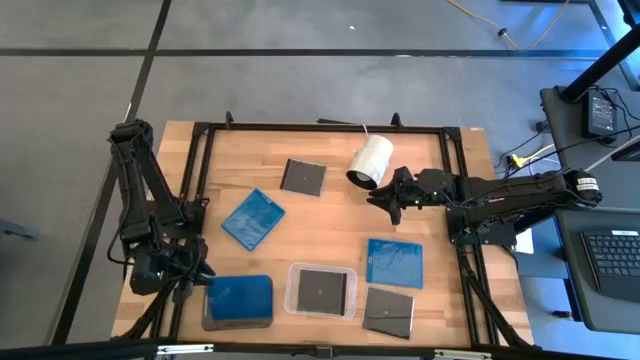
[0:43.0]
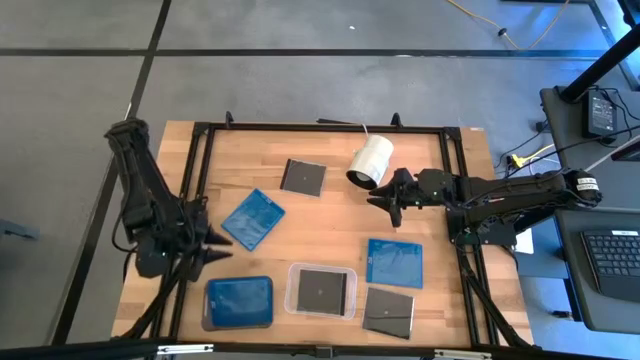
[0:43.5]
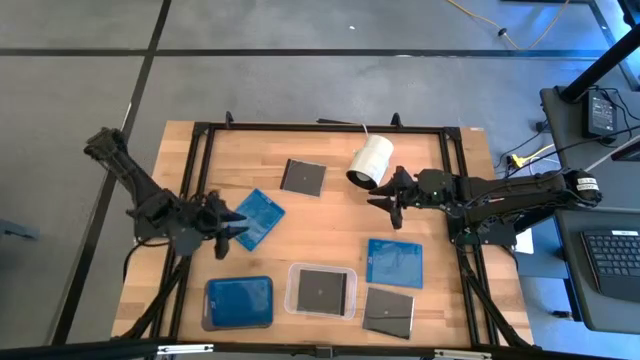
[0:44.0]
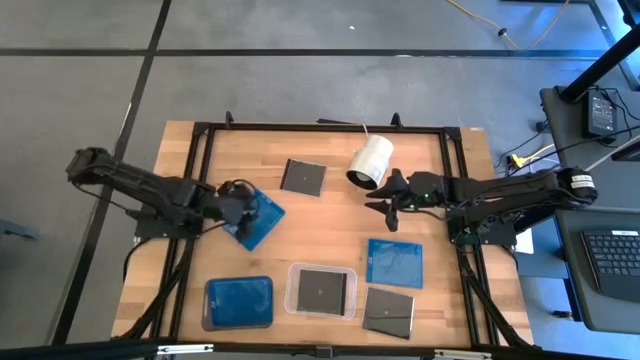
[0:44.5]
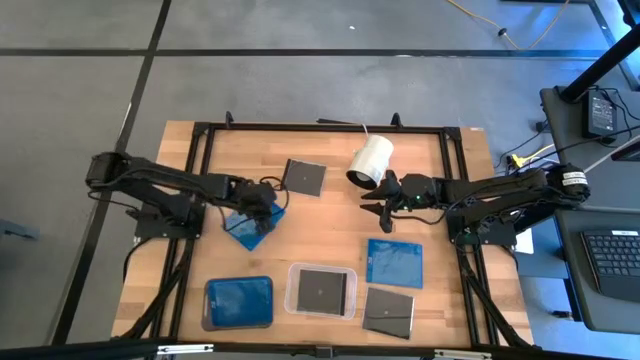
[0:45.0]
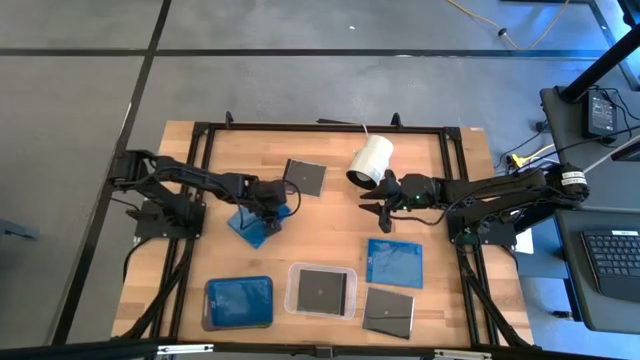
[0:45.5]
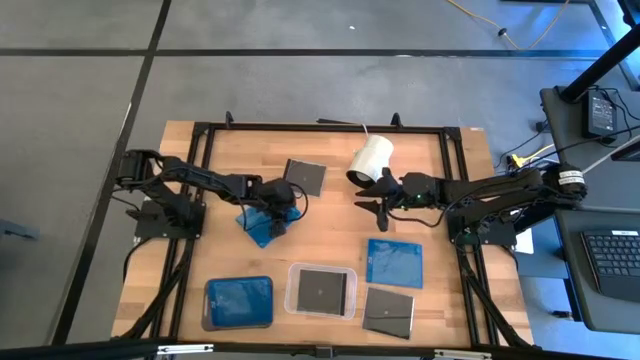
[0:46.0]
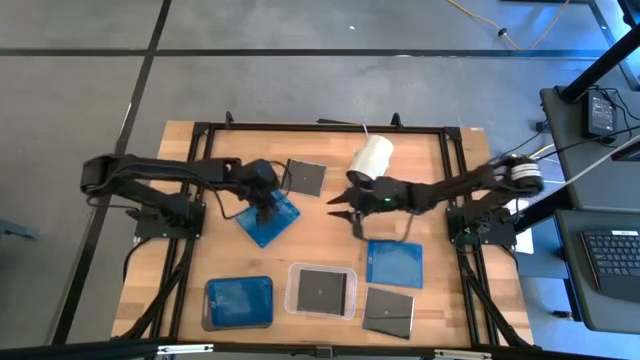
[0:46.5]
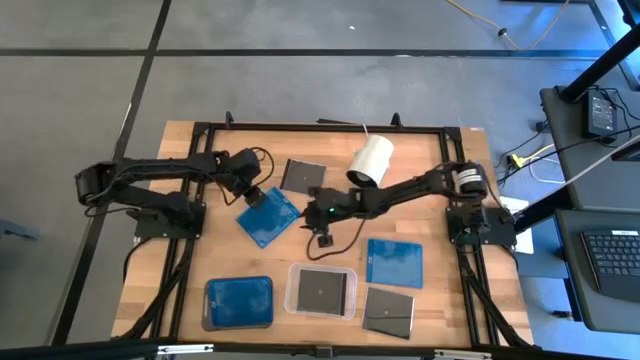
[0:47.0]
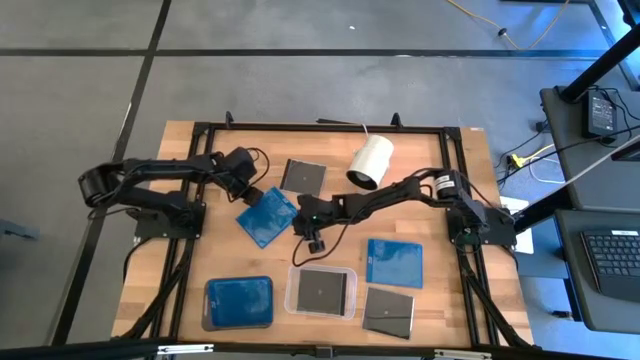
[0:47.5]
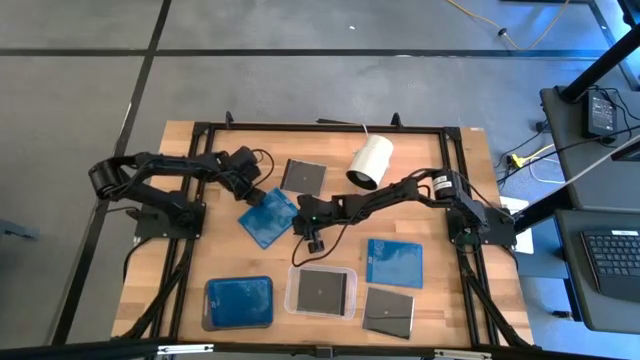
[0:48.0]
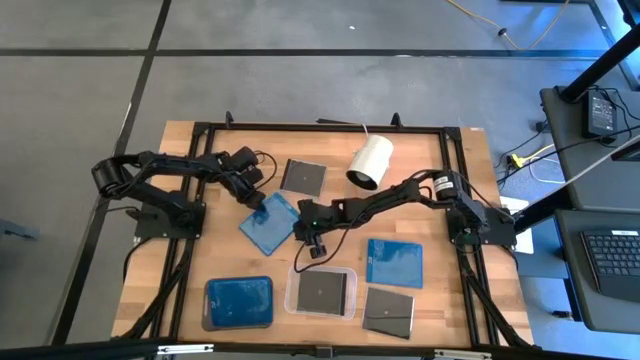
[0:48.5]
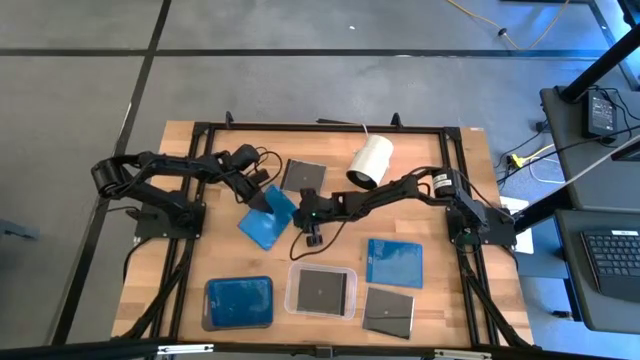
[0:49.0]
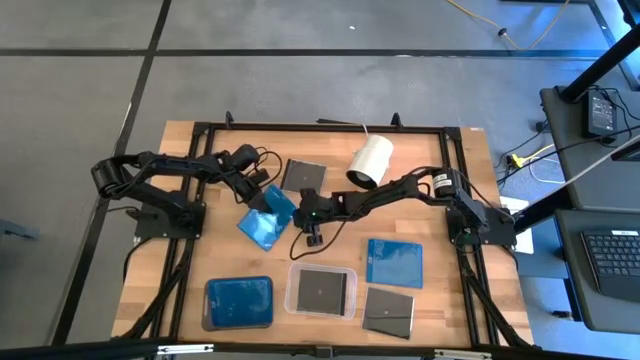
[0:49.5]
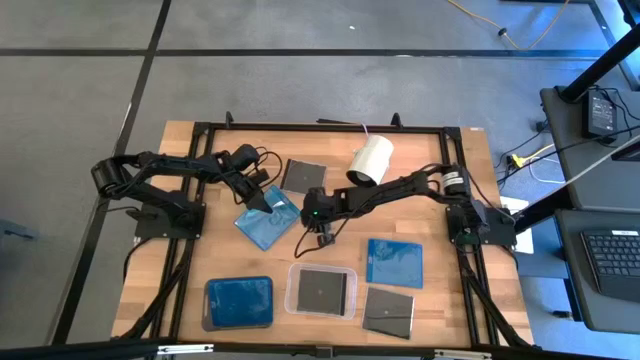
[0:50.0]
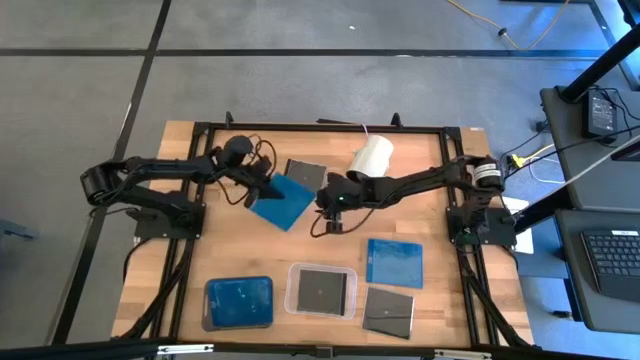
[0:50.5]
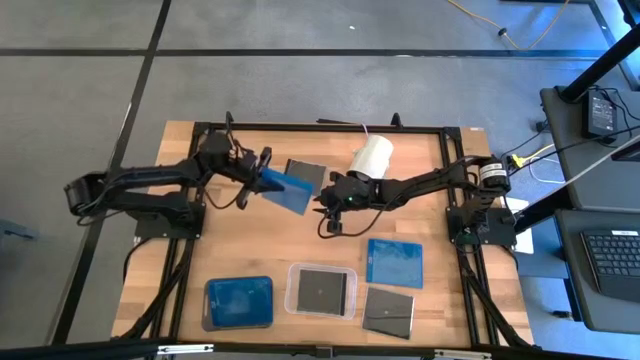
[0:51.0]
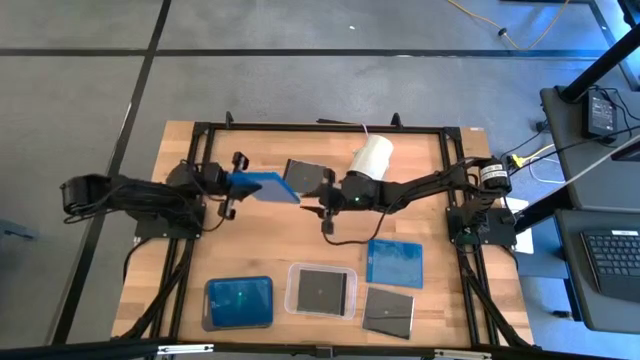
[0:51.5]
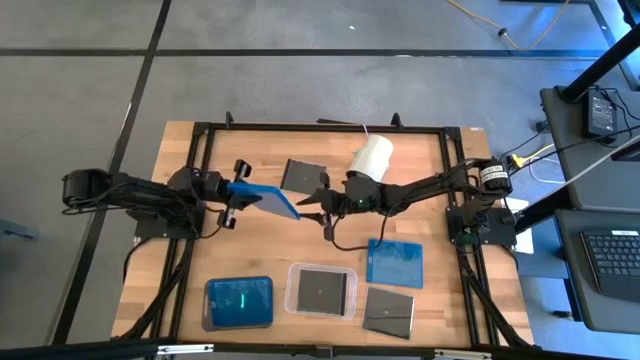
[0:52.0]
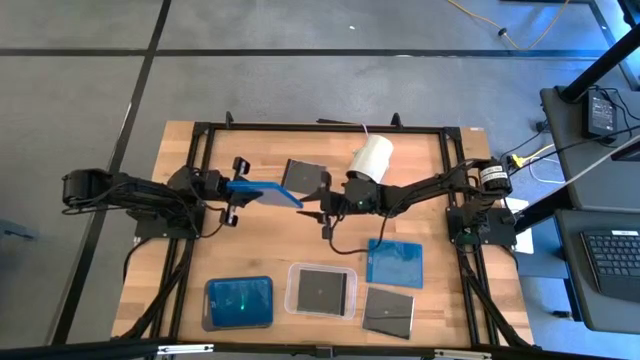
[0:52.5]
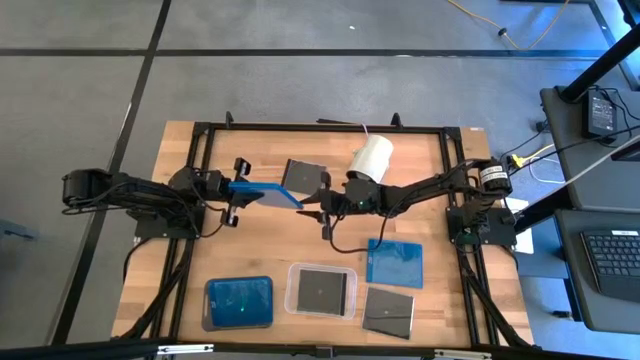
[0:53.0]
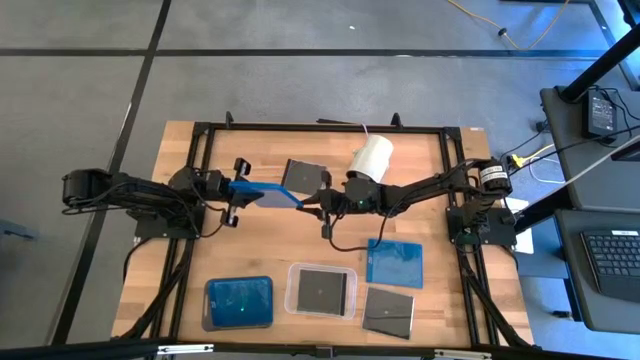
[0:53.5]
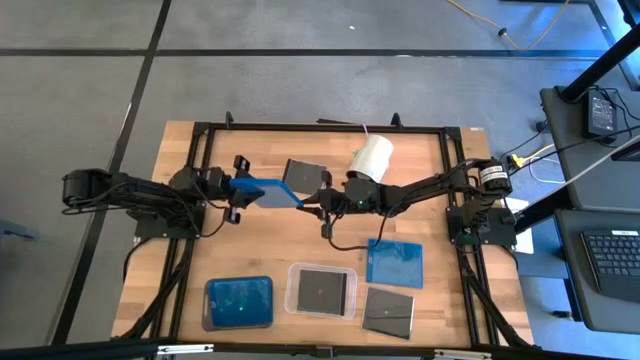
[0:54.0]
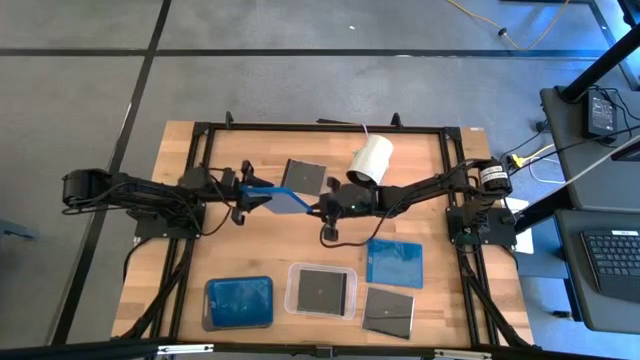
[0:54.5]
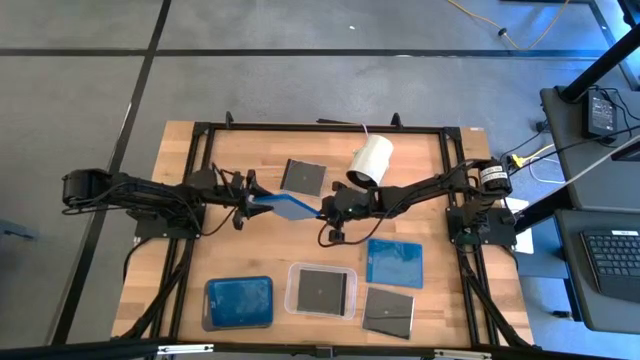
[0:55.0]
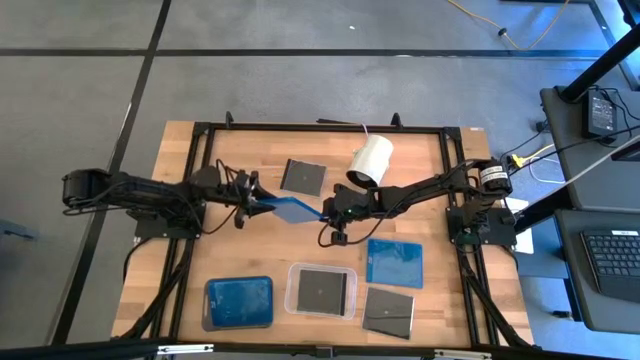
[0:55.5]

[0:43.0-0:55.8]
Task: Pick & place jewel cases by type
Put the left blue CD case into the black bin

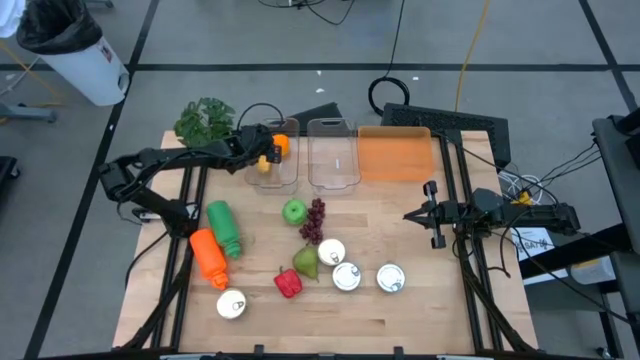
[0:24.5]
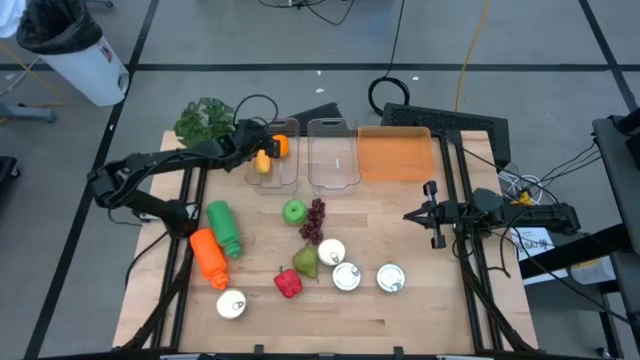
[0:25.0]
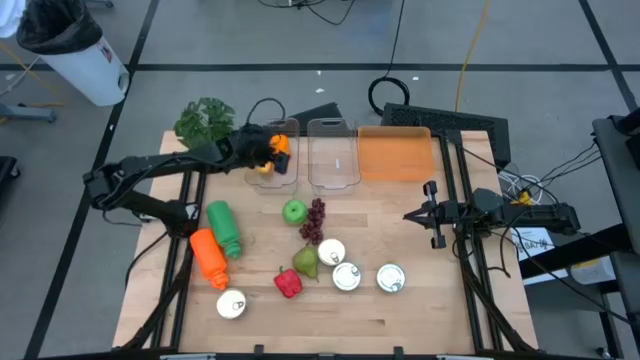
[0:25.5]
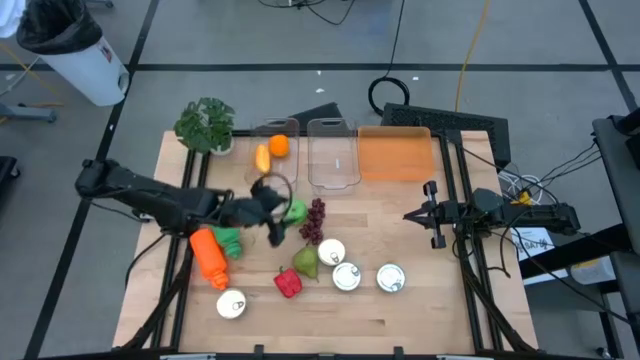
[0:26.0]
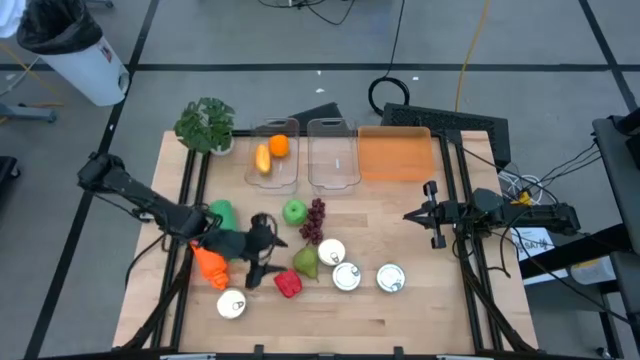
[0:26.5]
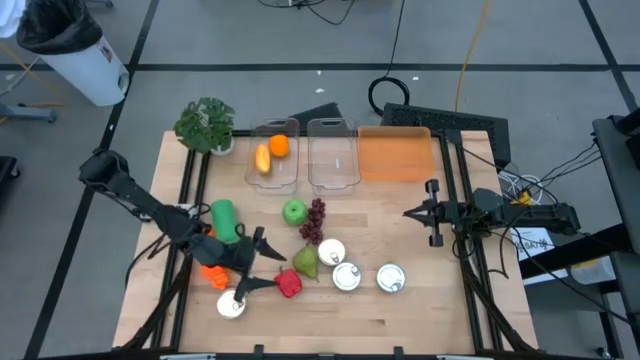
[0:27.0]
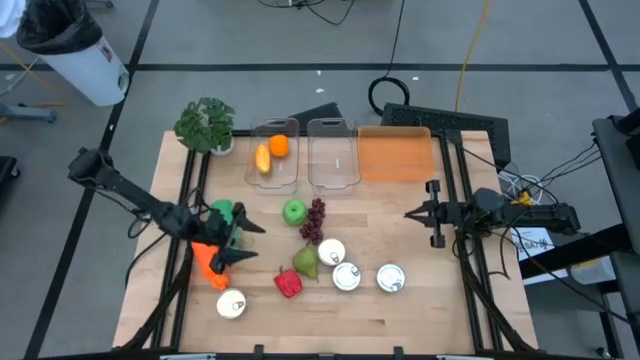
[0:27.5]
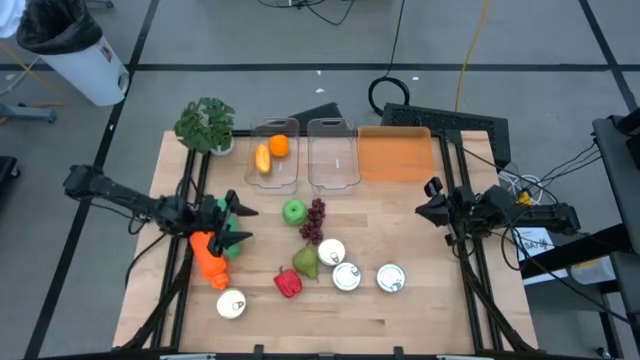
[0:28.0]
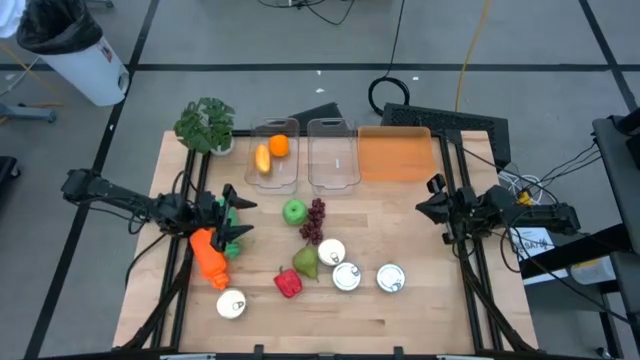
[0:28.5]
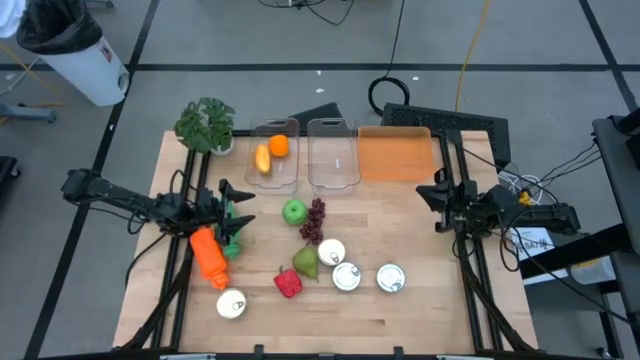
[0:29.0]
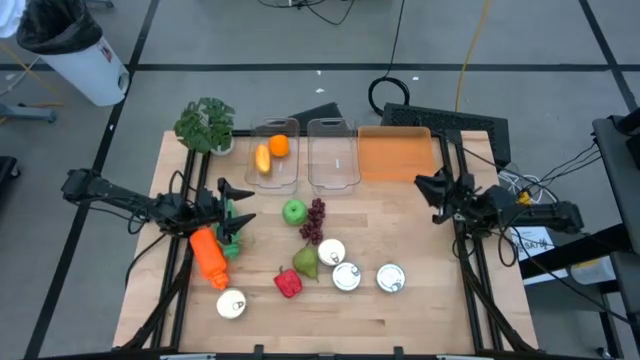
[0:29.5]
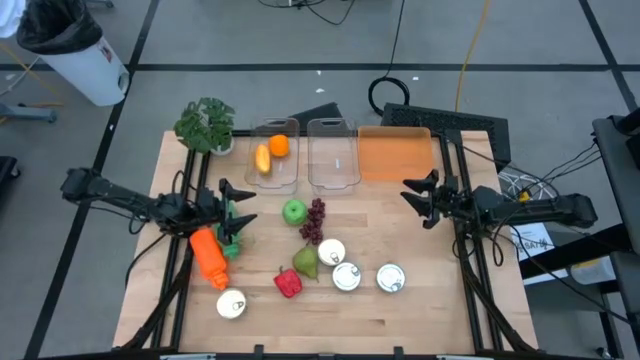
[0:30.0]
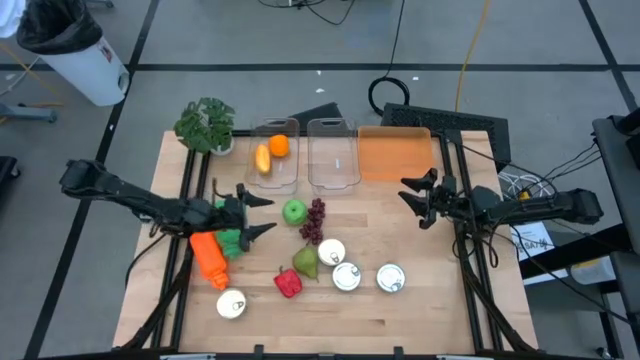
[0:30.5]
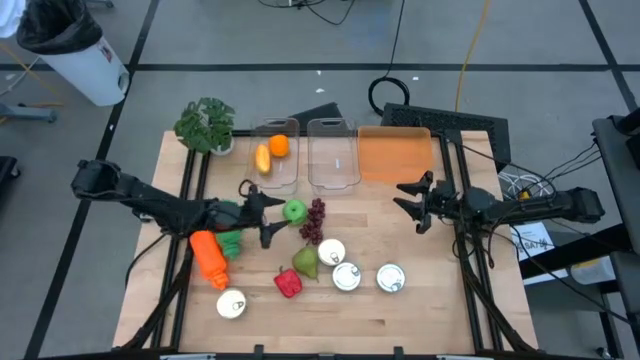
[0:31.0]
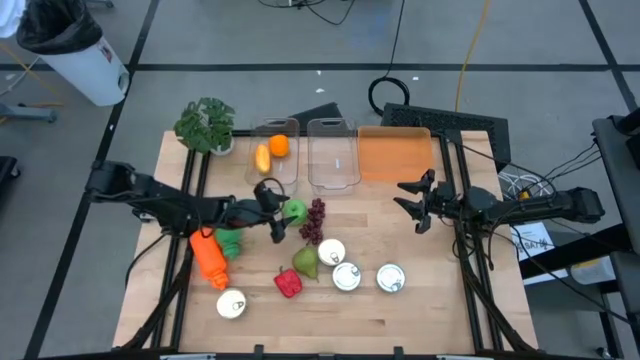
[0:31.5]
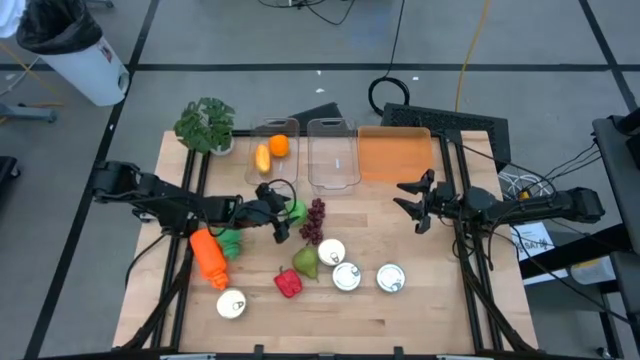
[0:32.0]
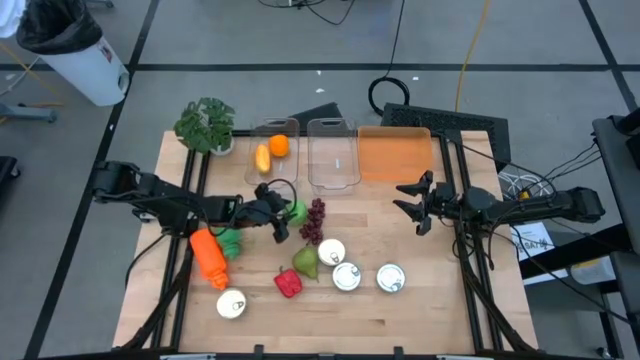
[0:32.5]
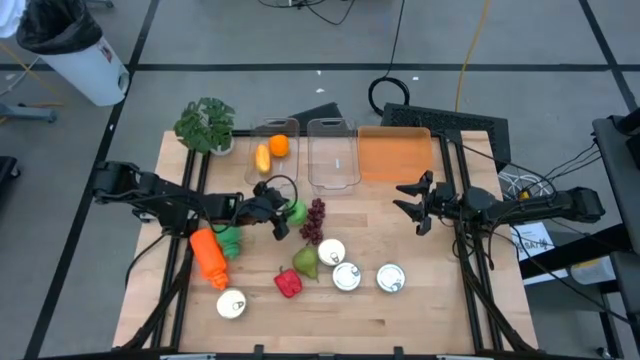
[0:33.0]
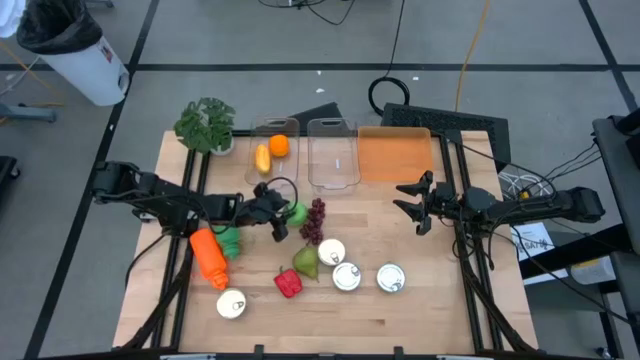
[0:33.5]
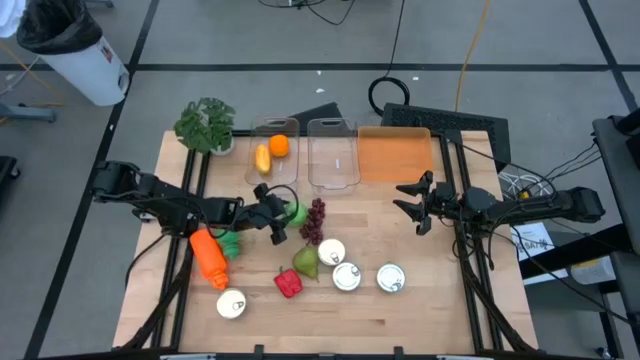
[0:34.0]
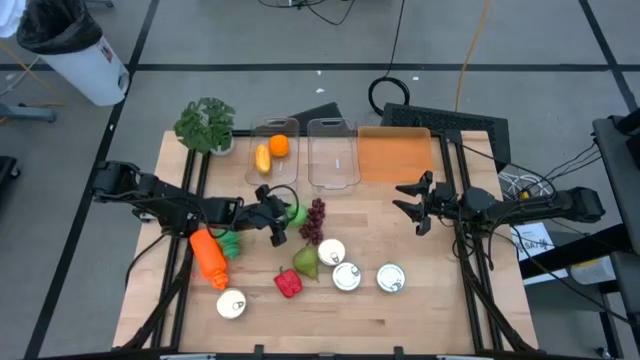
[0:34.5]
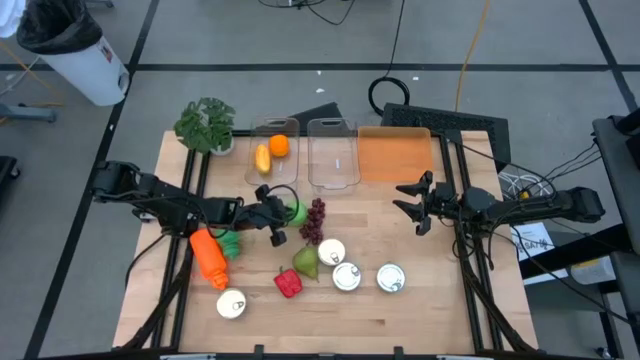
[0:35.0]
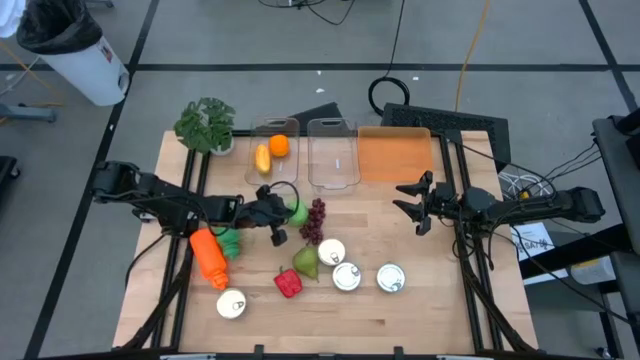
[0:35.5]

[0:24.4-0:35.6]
Task: Pick & Place Food Item
Put the green apple into the left transparent bin
